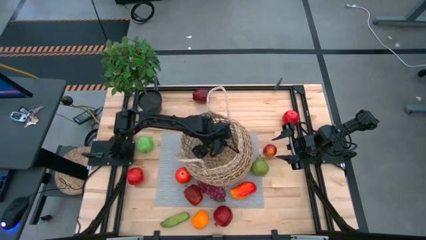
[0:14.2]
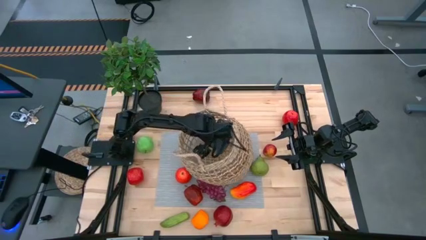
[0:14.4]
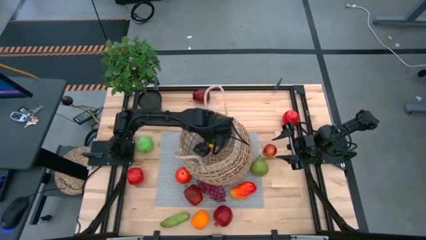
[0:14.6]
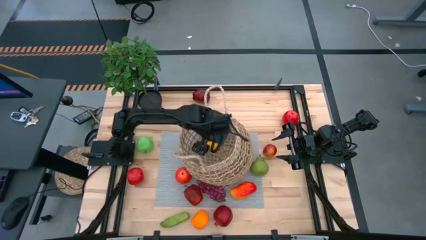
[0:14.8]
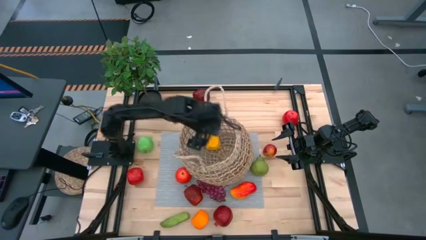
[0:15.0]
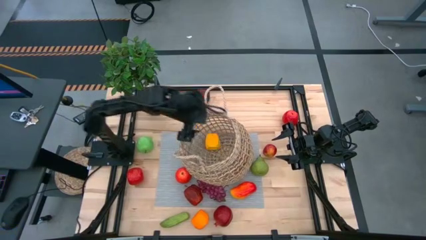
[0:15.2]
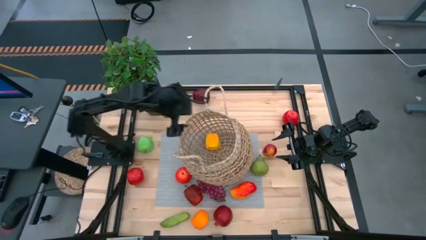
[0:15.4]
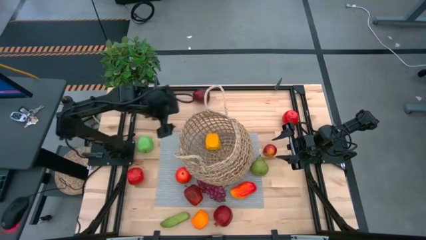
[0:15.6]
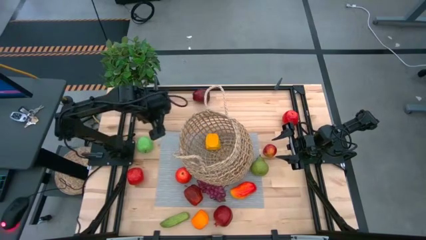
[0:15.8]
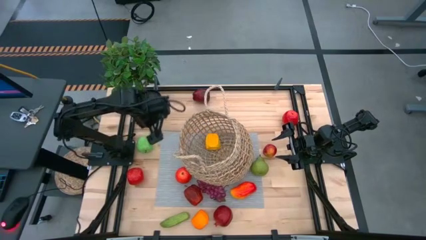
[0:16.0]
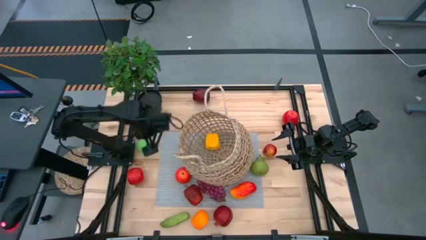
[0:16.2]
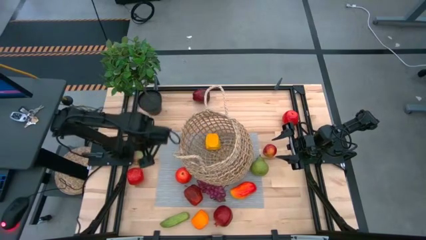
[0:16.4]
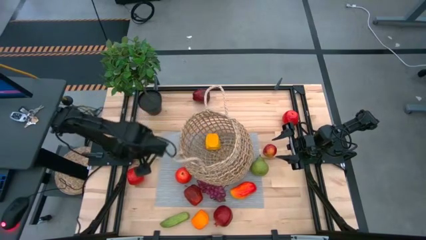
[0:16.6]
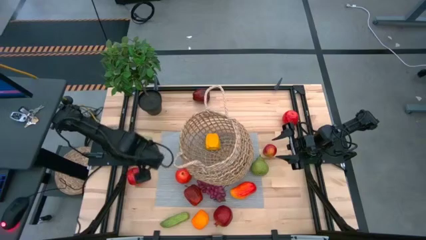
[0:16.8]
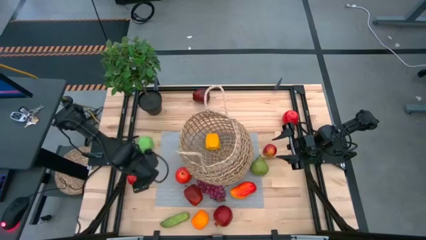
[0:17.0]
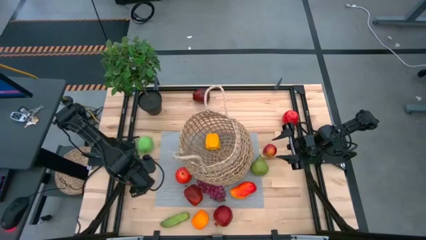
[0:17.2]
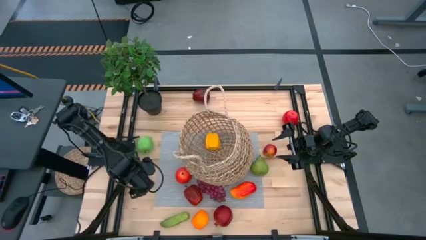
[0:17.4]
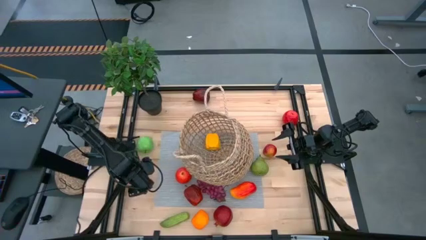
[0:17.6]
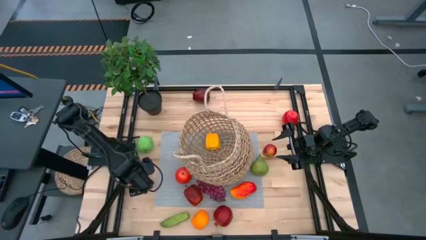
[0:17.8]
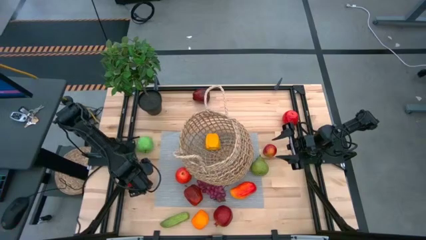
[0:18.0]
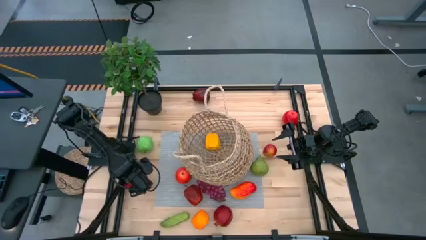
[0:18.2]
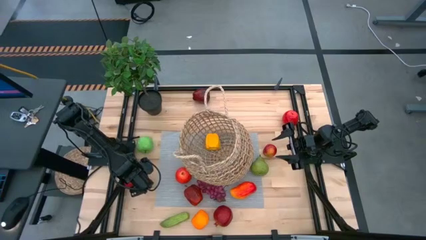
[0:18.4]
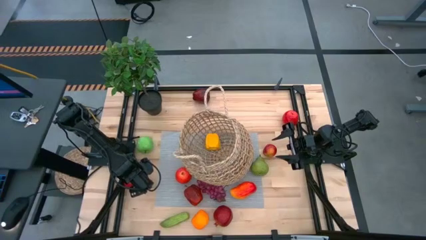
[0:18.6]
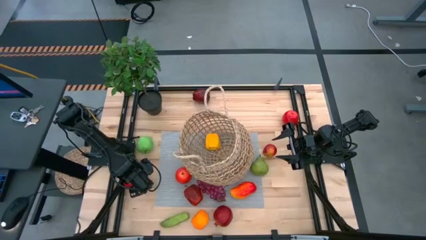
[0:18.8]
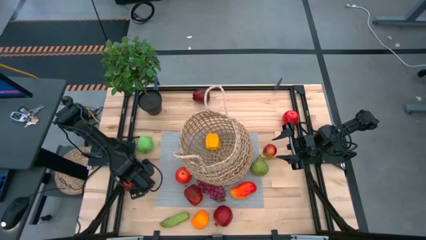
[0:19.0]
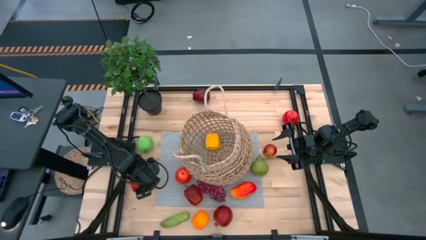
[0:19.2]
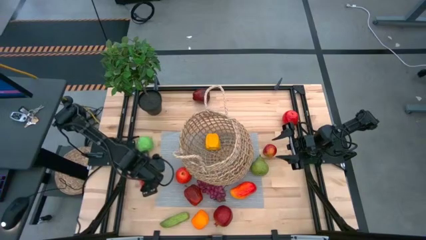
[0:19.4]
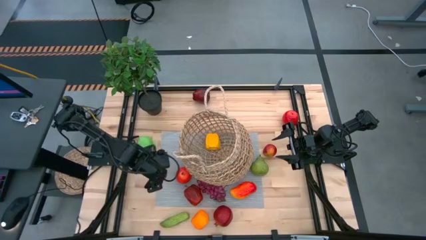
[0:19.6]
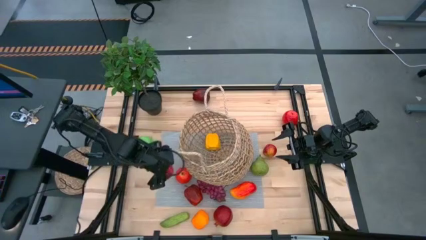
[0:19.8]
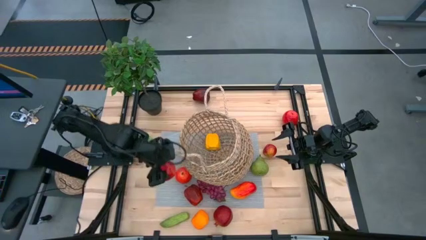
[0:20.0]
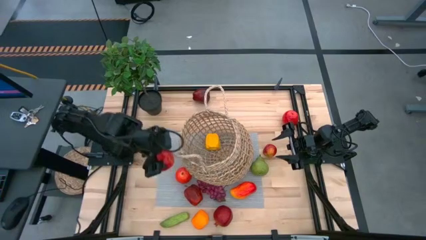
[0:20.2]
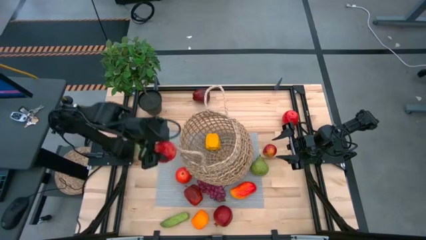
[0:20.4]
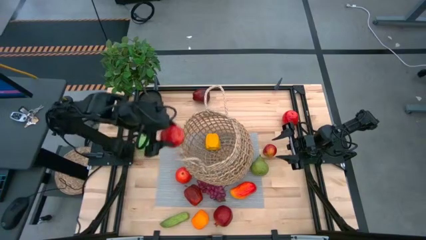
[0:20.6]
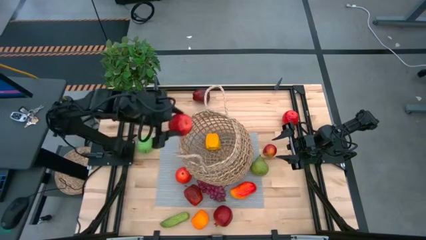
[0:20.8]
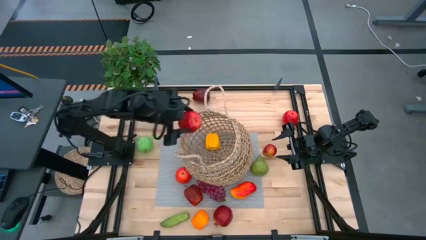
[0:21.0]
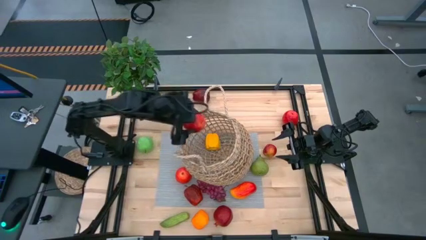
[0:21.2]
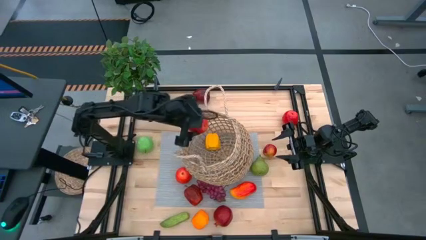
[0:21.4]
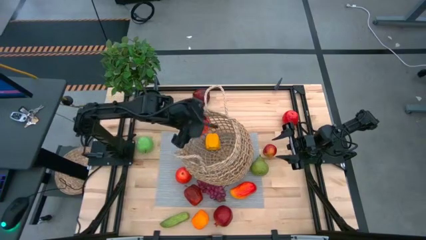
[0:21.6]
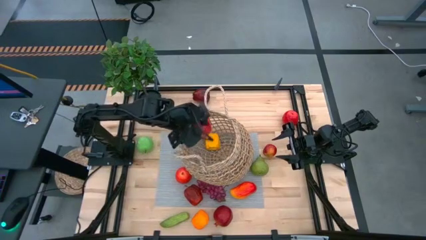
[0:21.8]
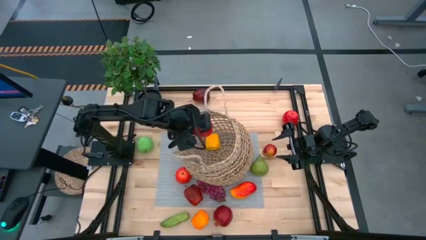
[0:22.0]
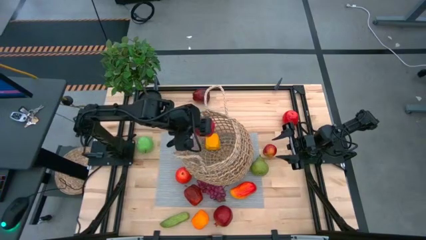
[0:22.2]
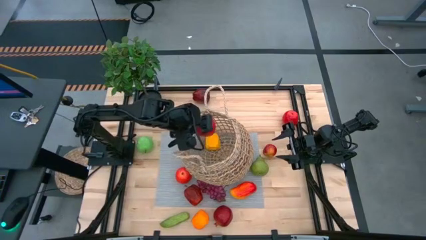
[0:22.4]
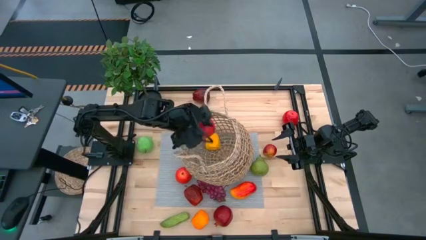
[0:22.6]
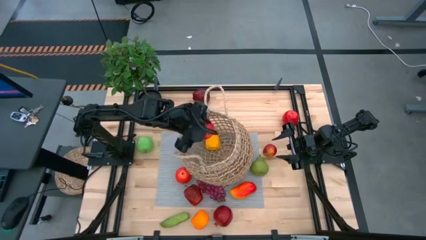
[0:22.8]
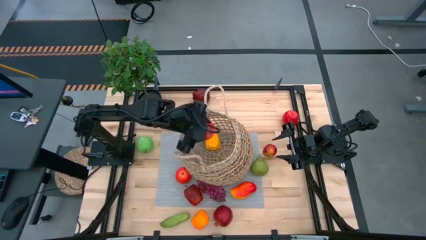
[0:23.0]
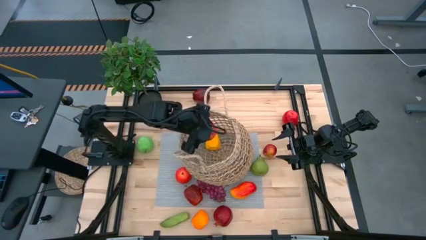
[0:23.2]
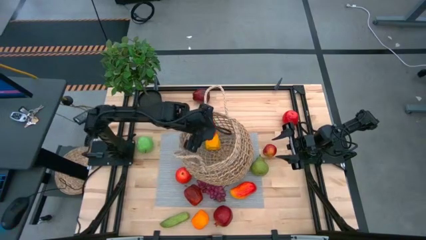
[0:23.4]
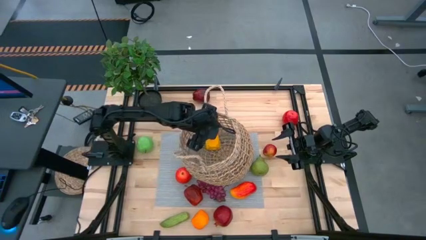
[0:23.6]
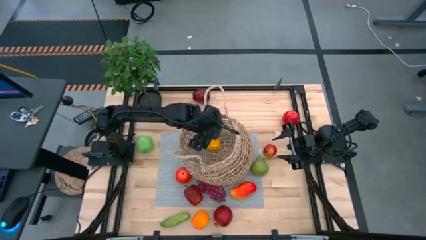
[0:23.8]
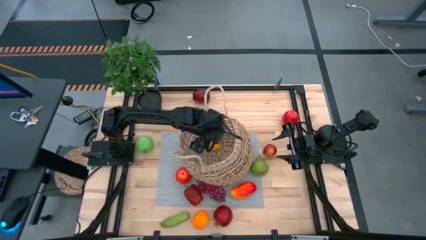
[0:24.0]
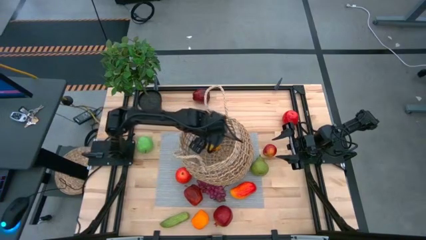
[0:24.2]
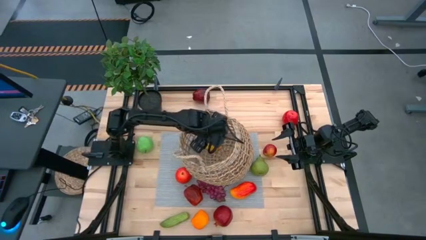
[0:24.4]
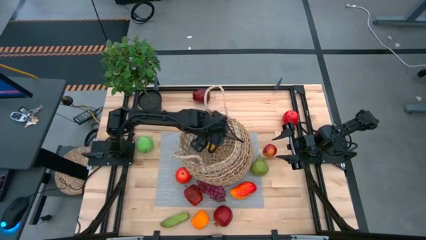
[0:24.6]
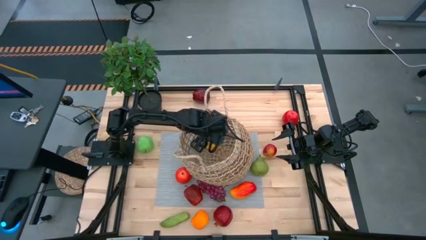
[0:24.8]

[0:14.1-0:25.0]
Task: Build produce basket
Put the red apple into the basket
